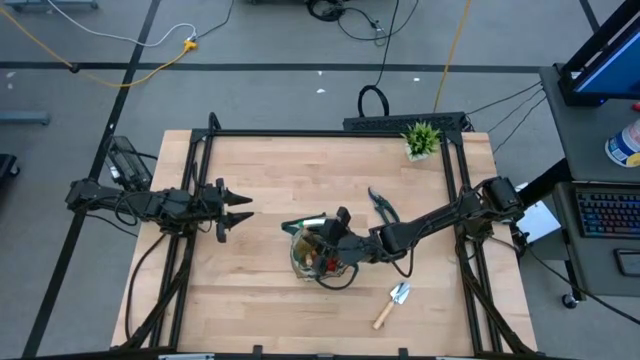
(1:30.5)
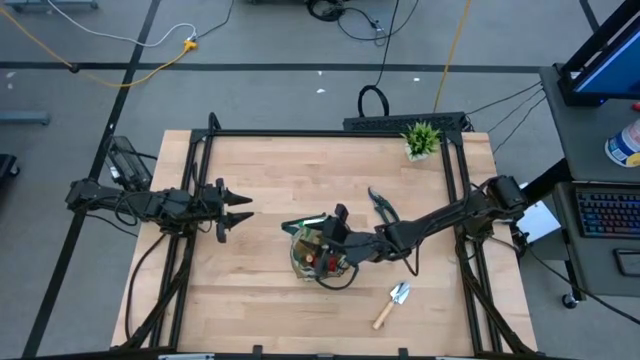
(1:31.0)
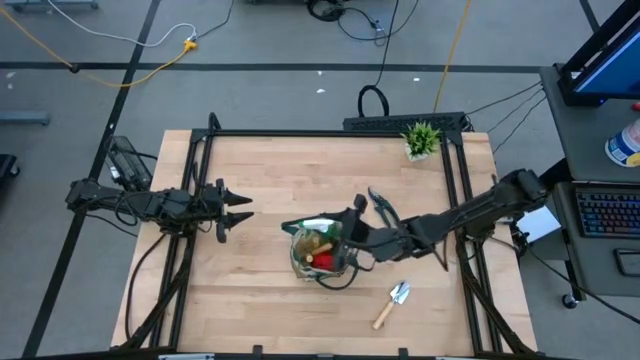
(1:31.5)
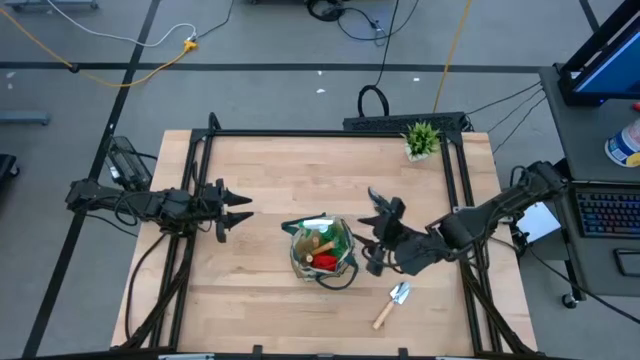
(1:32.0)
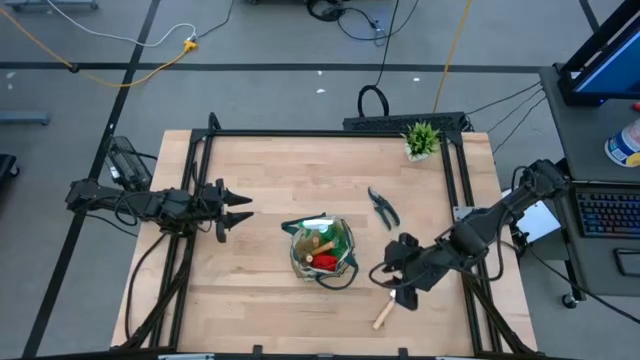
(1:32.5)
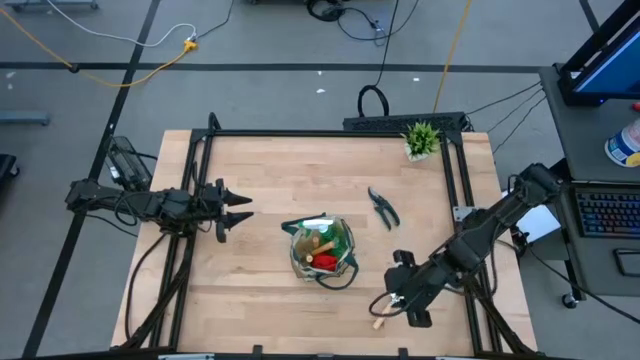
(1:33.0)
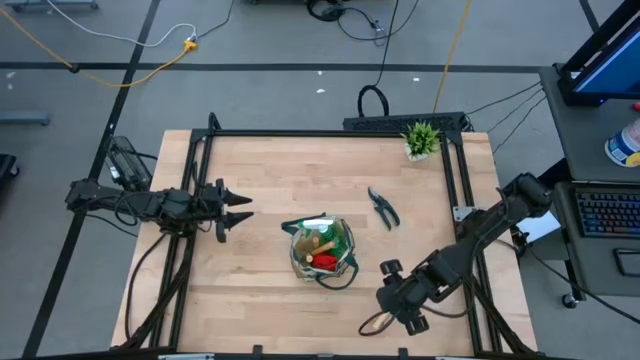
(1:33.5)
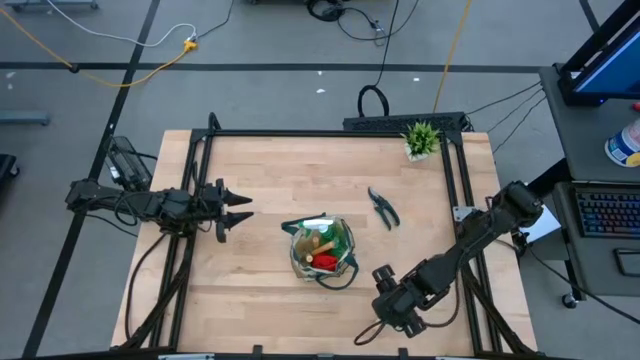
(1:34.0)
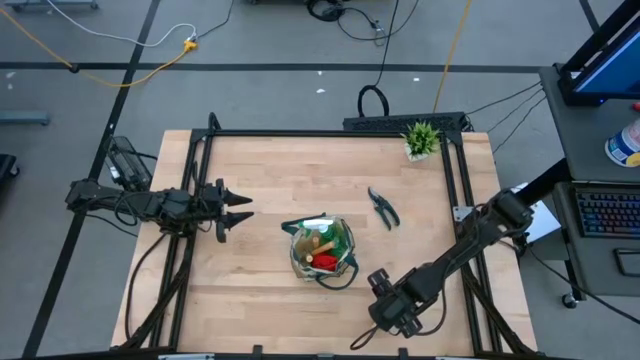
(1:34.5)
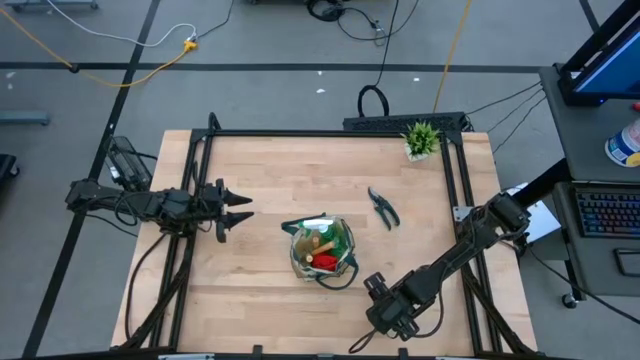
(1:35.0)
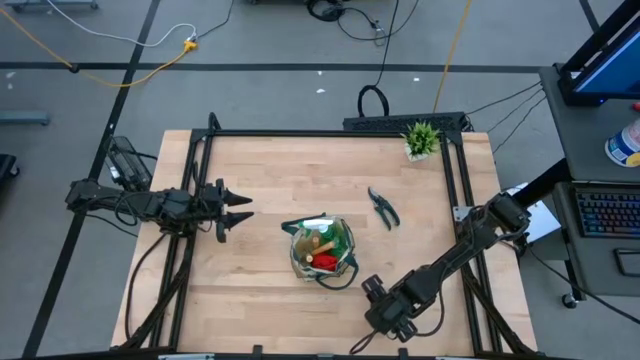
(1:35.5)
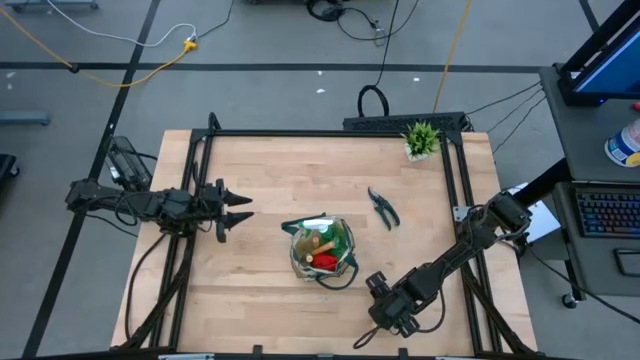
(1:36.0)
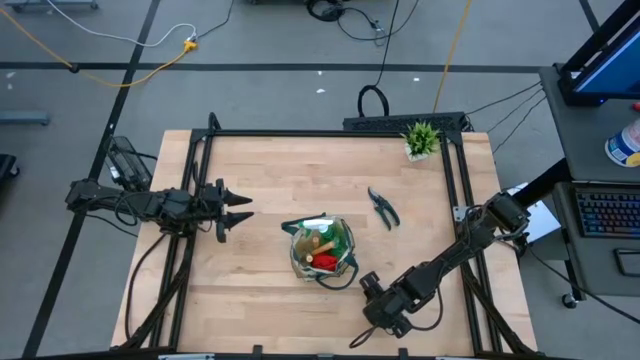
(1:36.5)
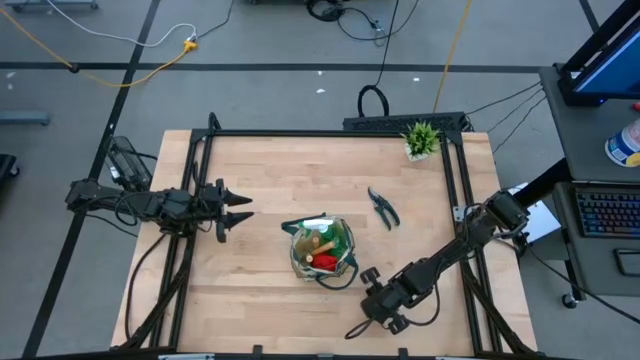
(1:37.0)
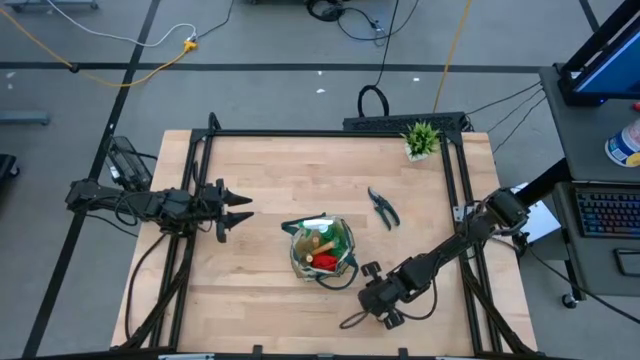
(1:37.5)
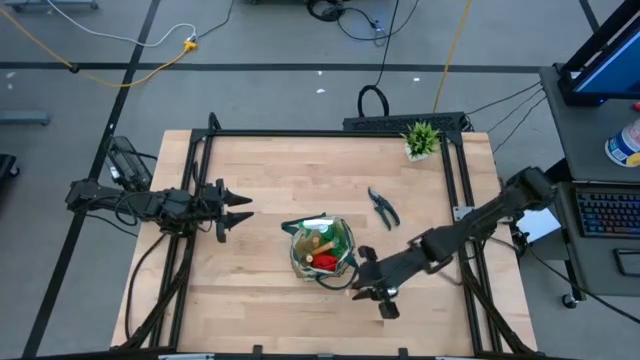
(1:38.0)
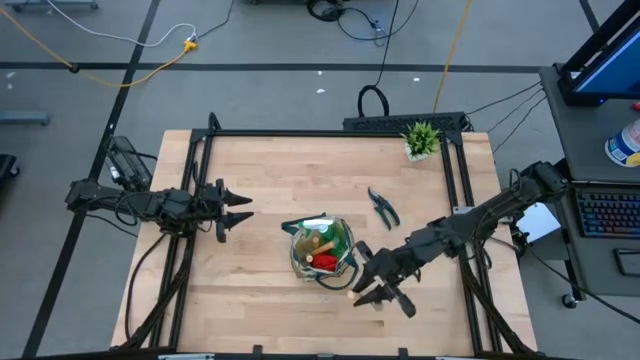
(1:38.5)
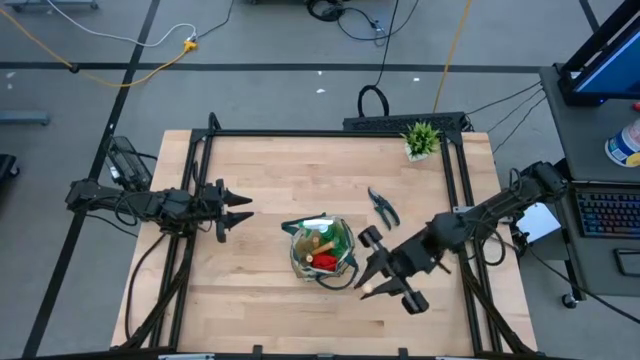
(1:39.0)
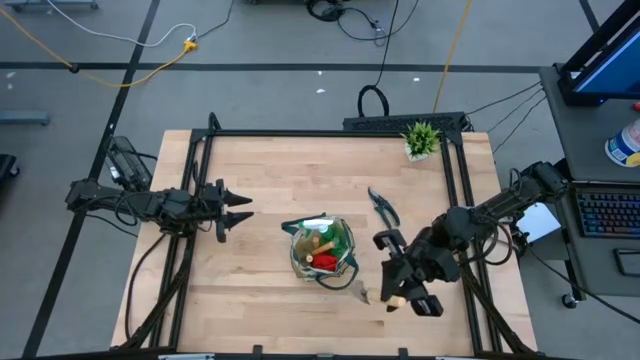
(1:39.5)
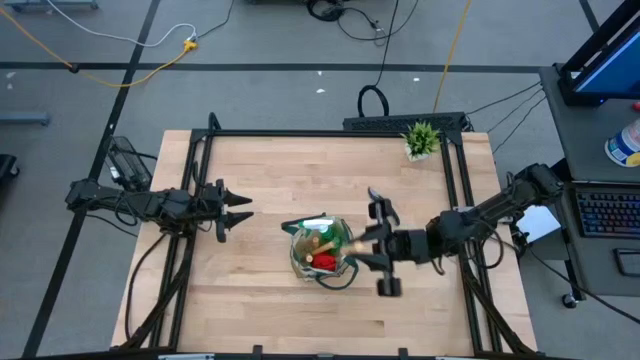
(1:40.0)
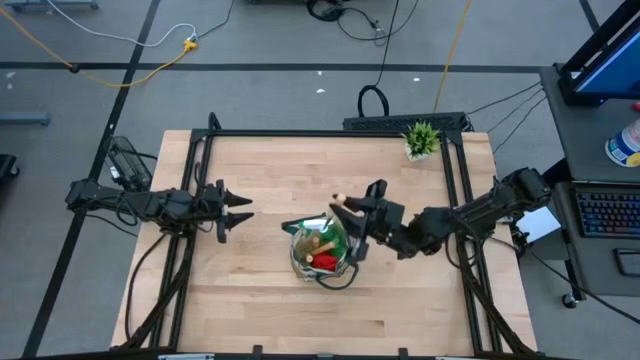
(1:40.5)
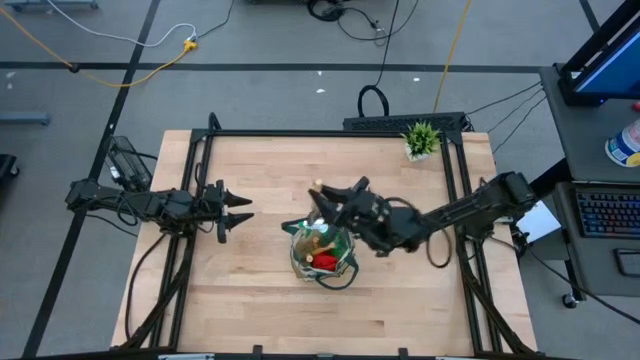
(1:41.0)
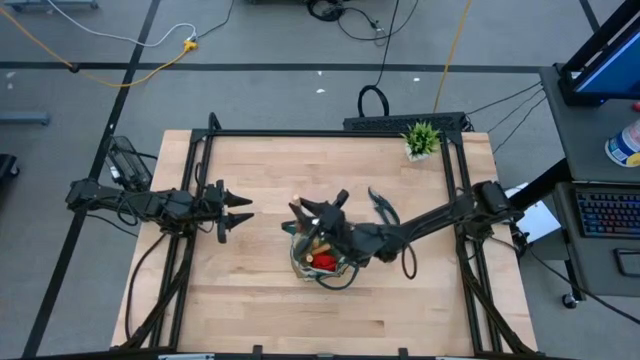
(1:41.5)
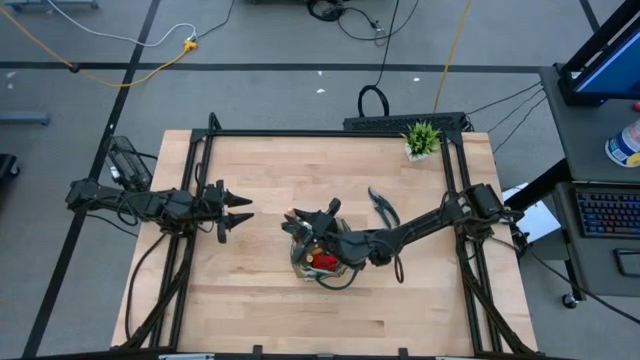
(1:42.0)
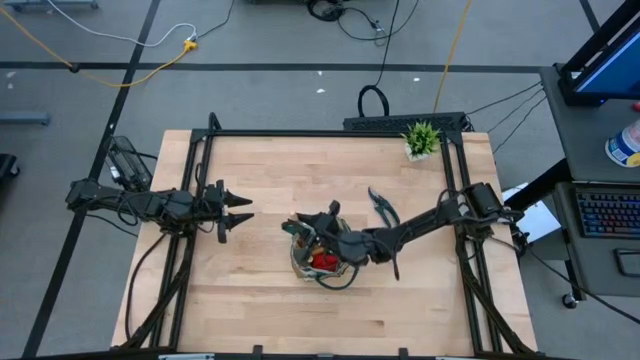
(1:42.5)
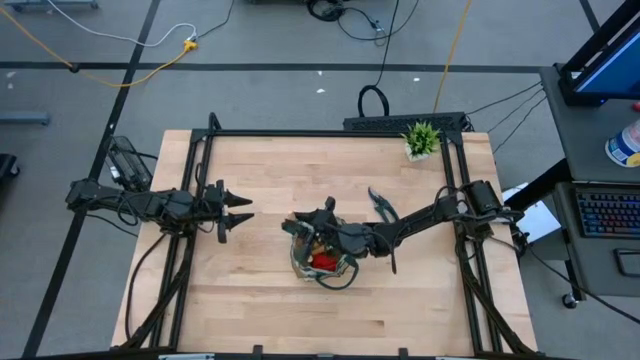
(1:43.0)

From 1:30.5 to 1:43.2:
Task: Pick & Place Garden tools in Gardening bag
Put the brown trowel into the gardening bag

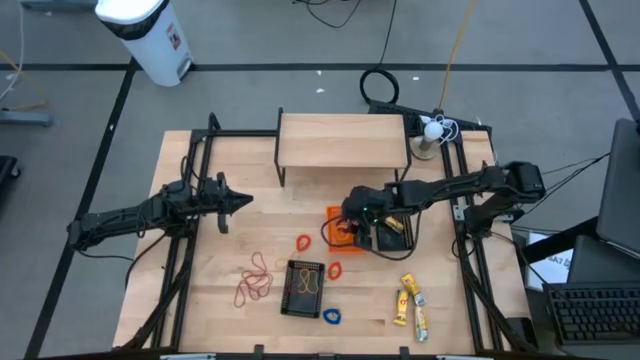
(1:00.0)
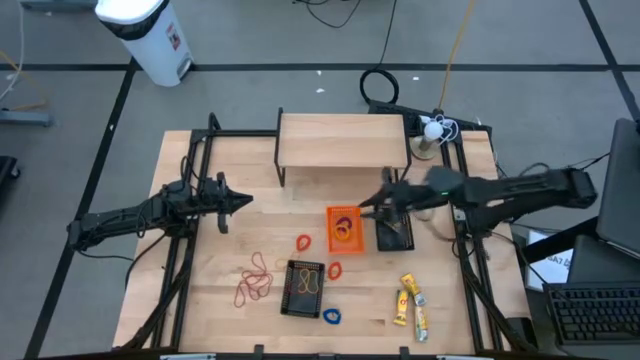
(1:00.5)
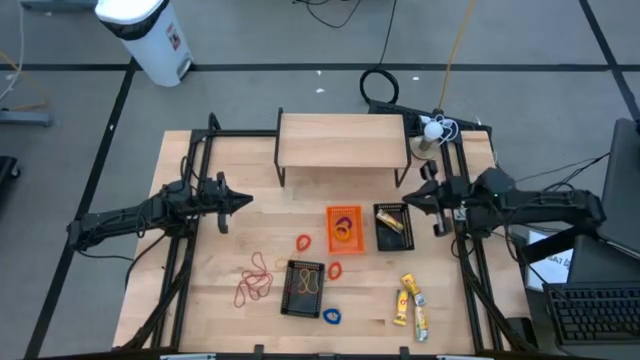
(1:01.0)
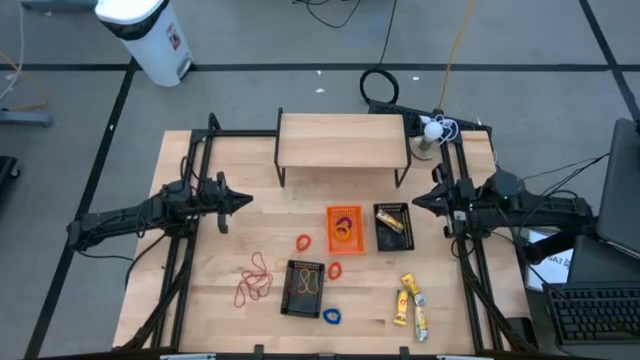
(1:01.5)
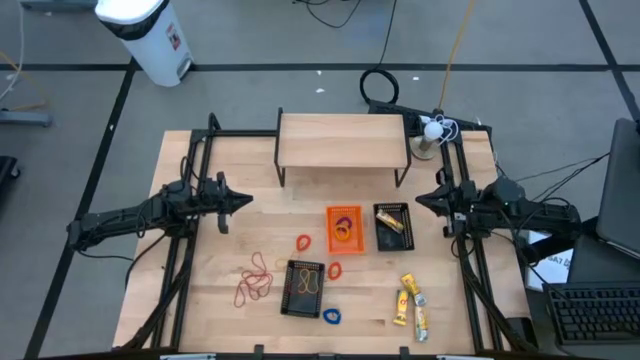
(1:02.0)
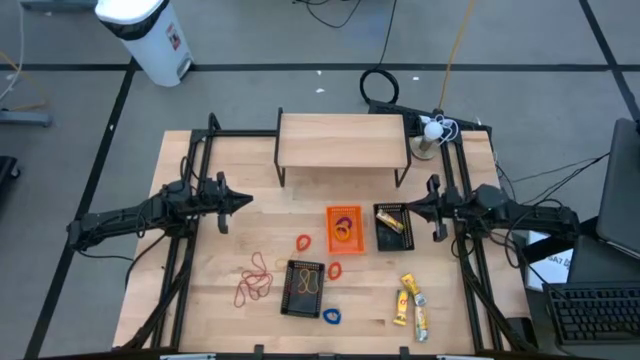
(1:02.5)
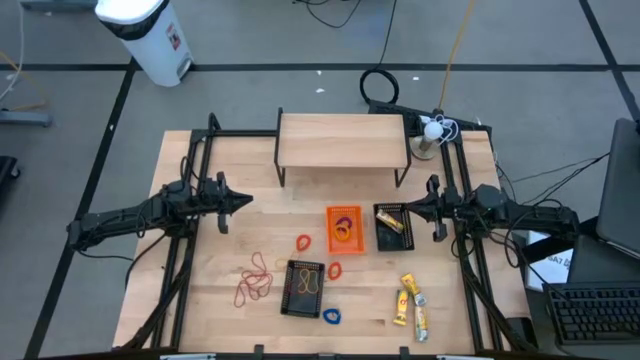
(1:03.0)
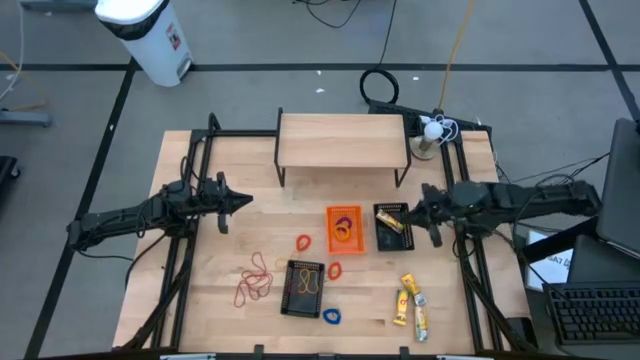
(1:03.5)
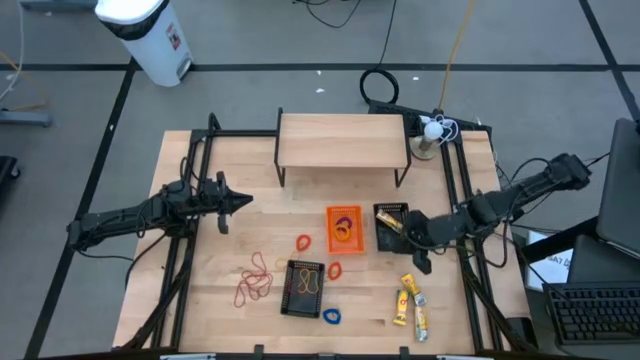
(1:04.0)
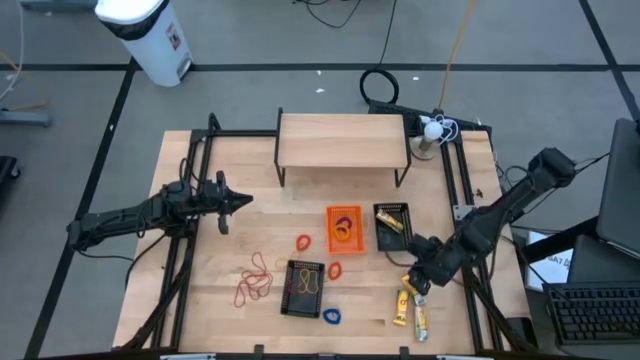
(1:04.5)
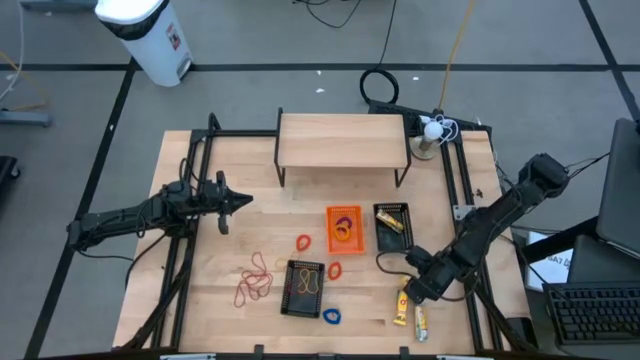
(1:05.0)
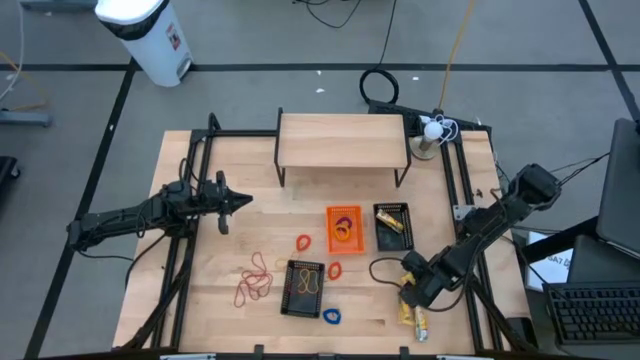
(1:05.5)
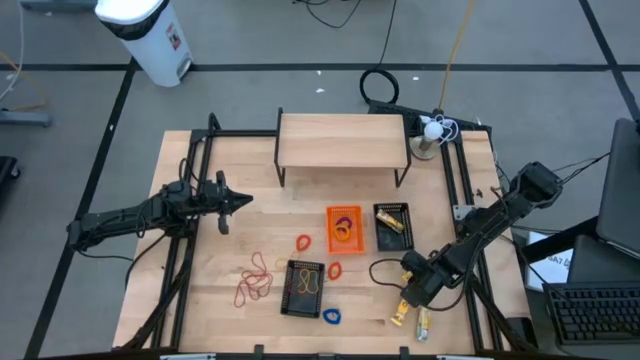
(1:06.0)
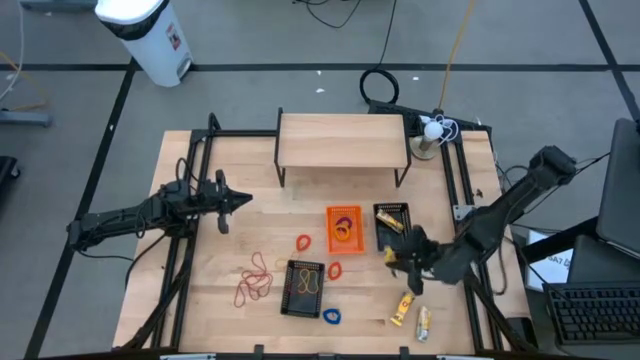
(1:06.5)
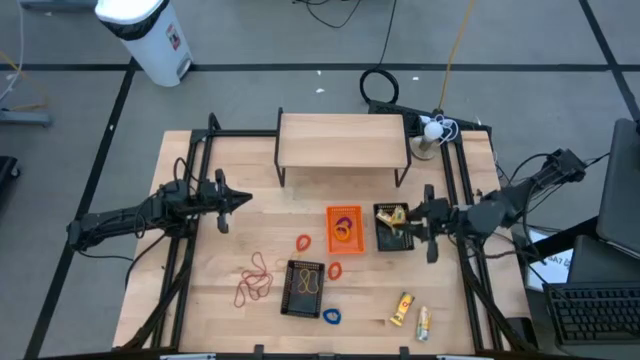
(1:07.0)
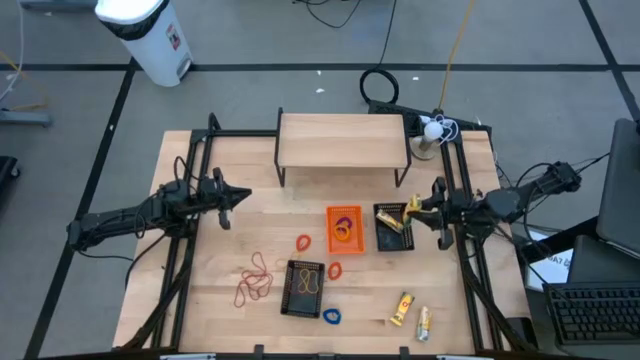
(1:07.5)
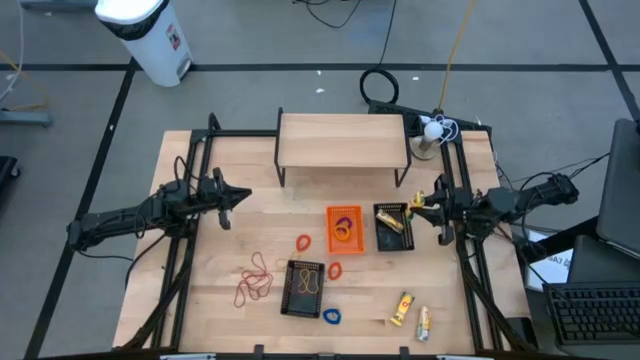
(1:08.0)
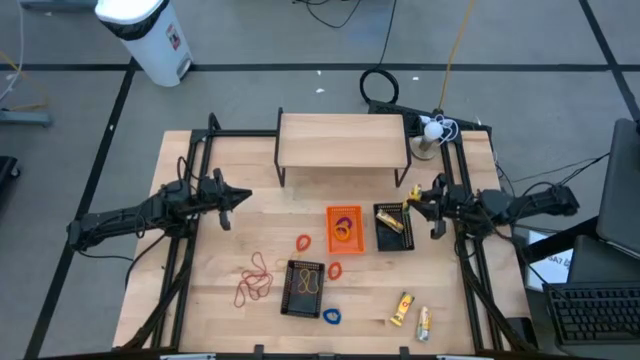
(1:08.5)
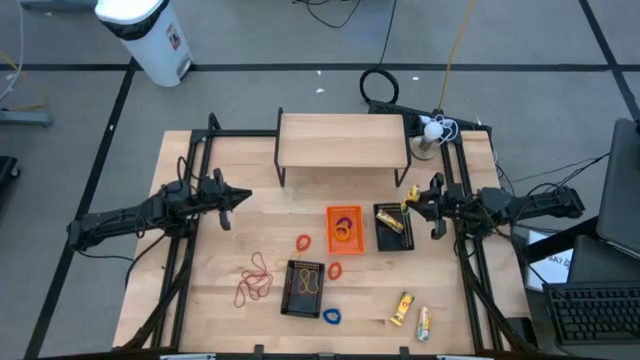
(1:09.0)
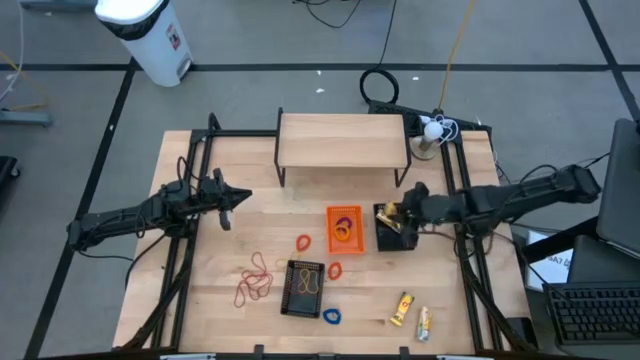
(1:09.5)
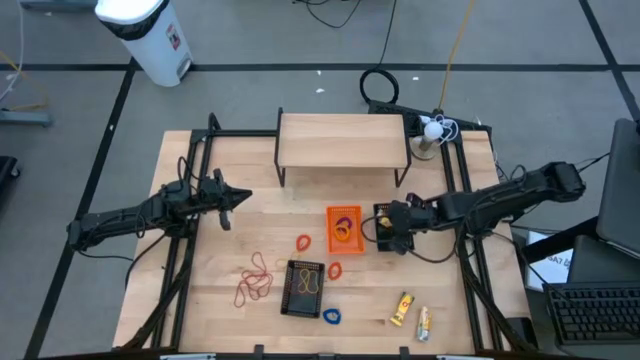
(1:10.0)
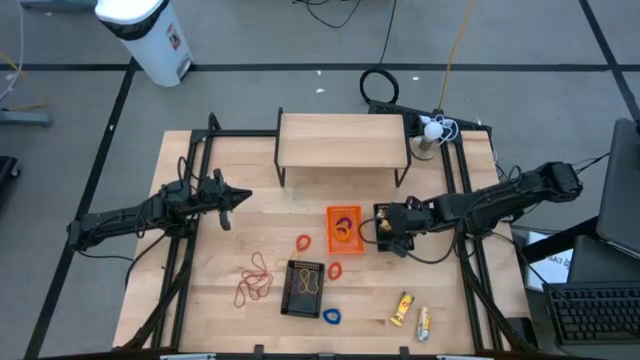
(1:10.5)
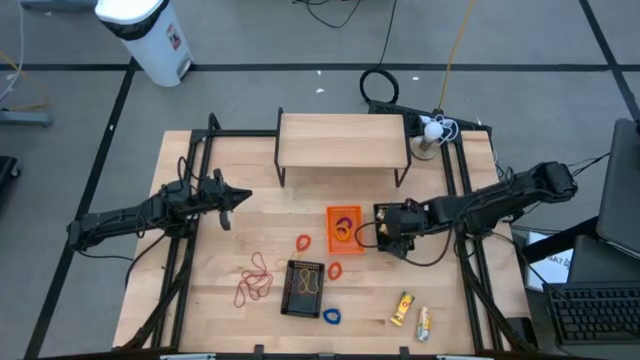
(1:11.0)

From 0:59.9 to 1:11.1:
Task: Pick & Place Office Desk Supplies
Put the yellow crayon box into the top black bin
